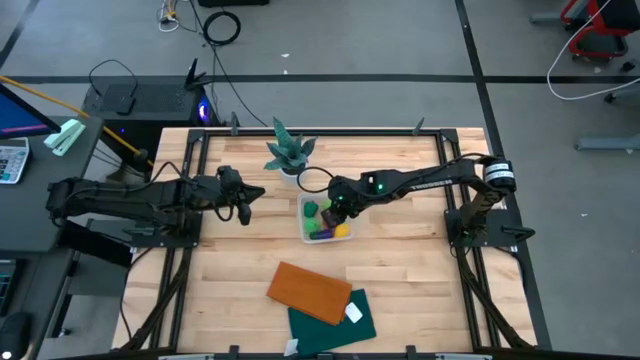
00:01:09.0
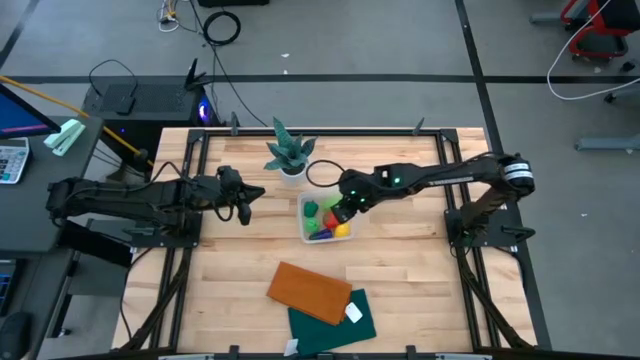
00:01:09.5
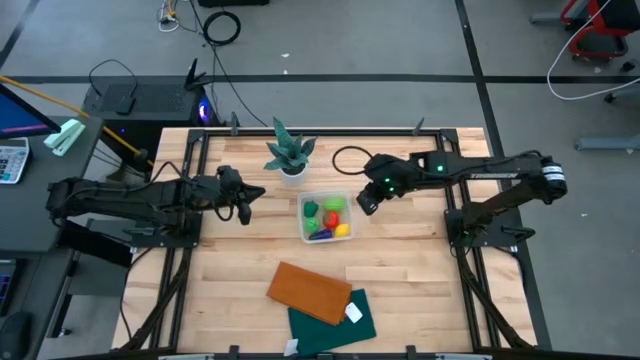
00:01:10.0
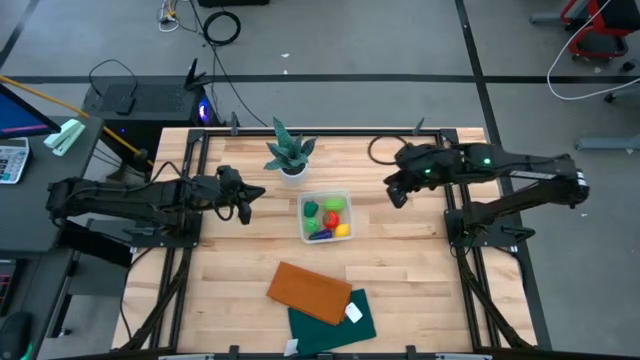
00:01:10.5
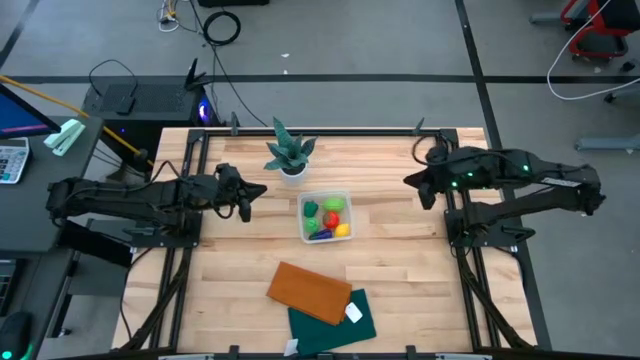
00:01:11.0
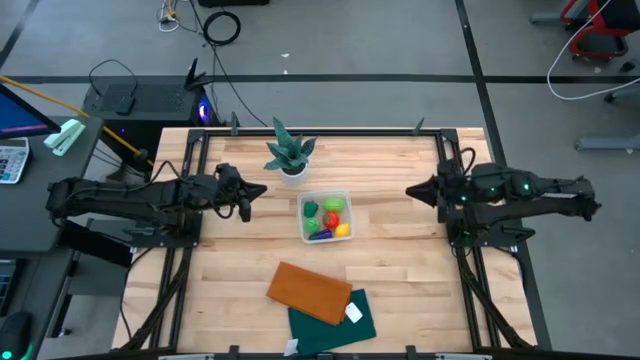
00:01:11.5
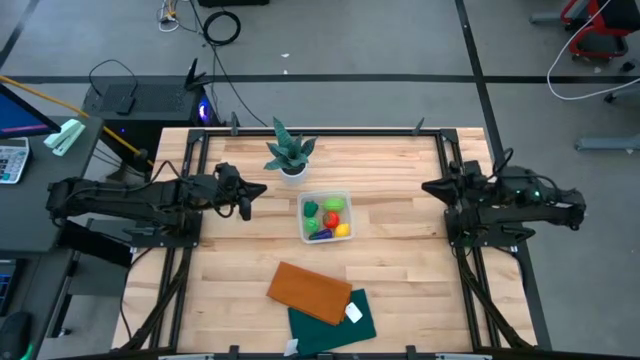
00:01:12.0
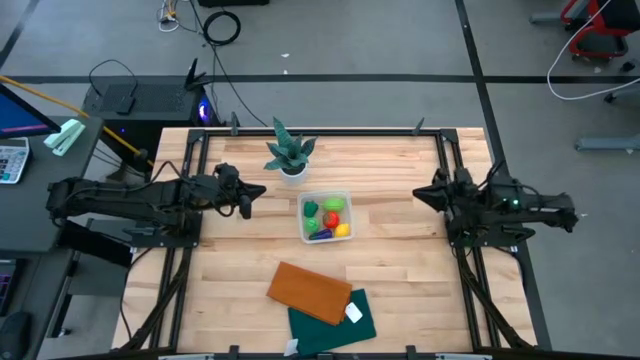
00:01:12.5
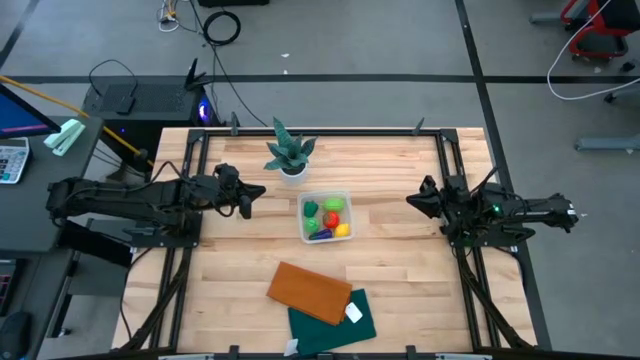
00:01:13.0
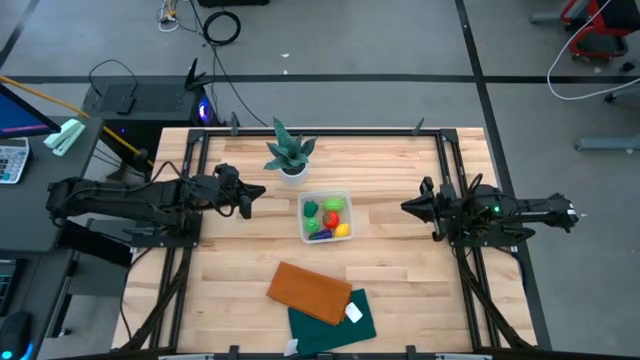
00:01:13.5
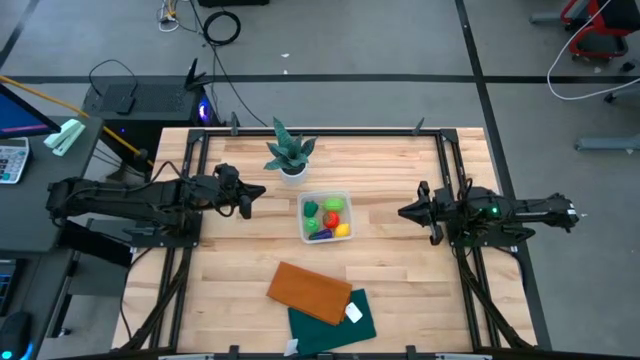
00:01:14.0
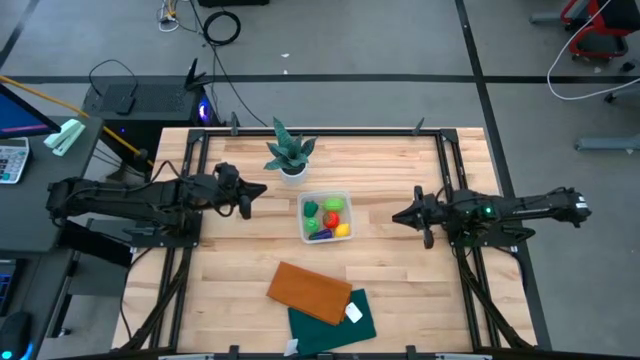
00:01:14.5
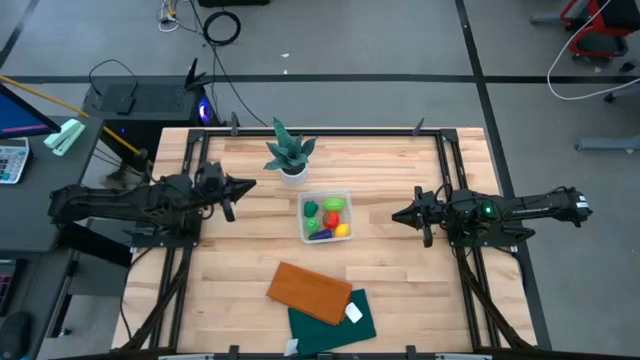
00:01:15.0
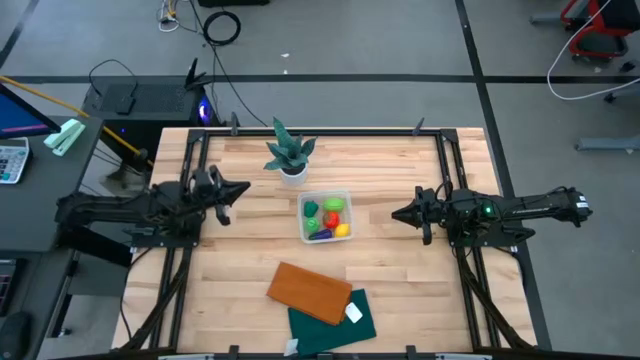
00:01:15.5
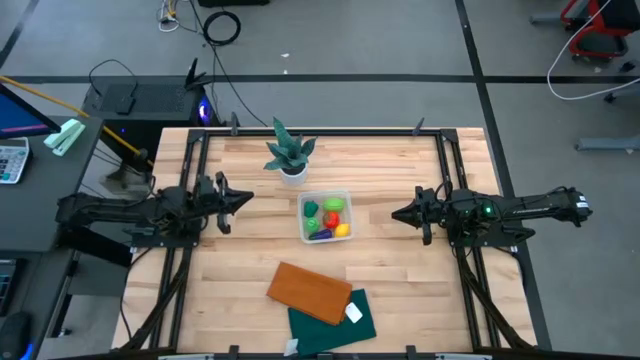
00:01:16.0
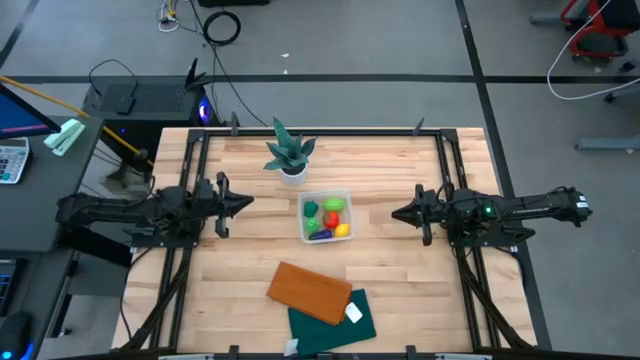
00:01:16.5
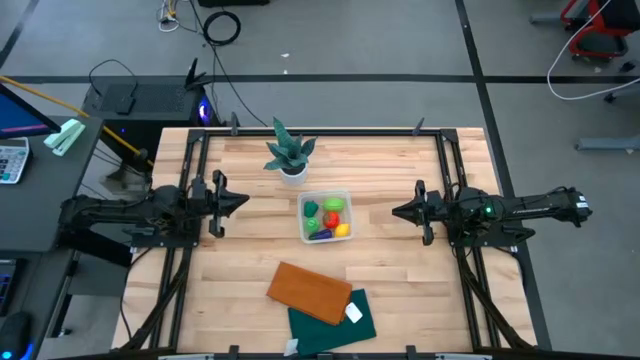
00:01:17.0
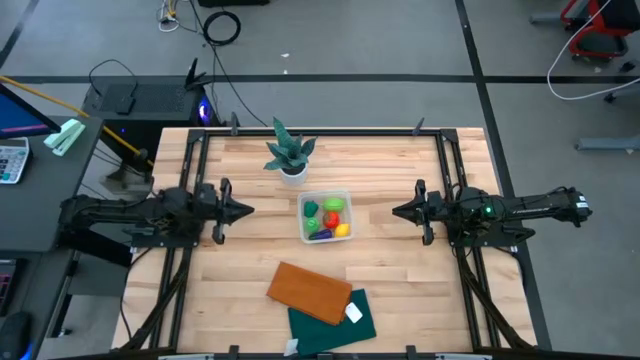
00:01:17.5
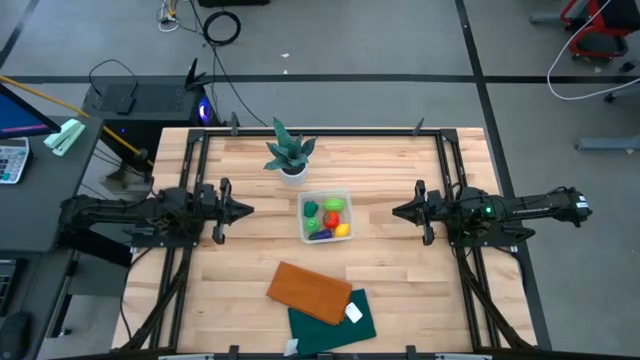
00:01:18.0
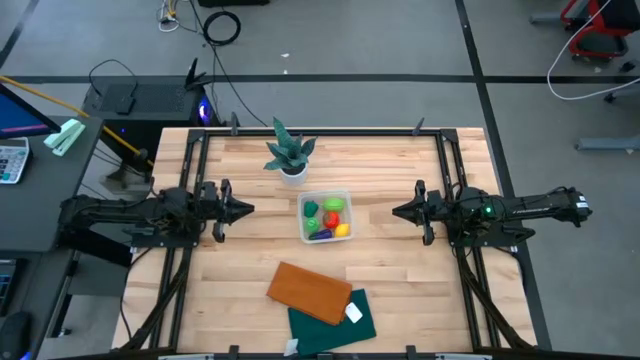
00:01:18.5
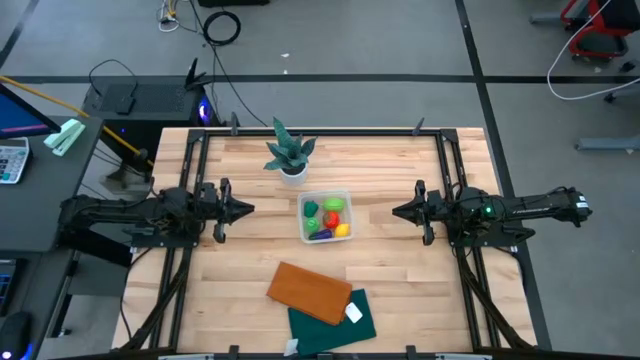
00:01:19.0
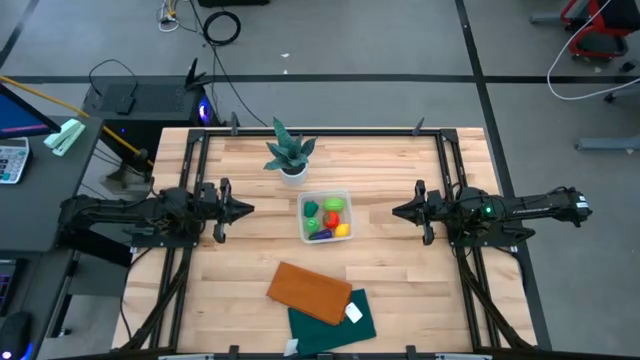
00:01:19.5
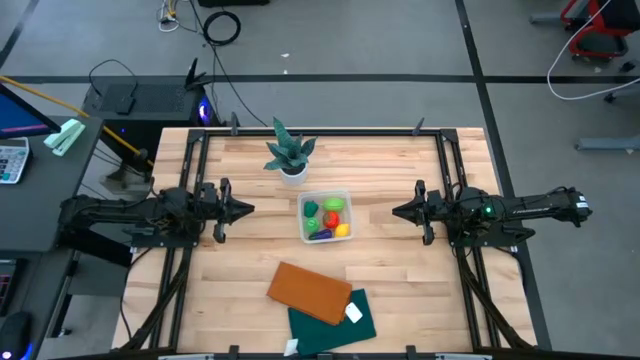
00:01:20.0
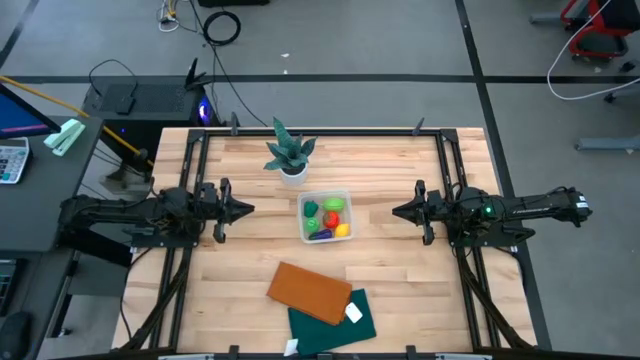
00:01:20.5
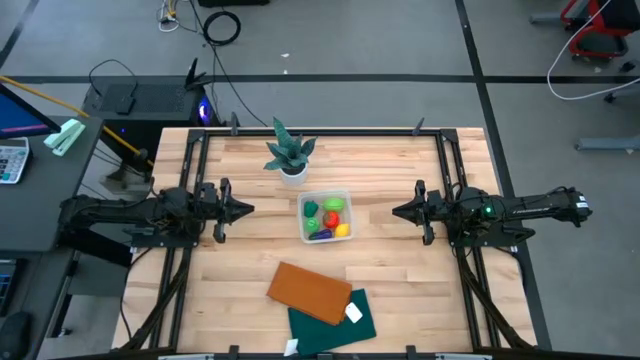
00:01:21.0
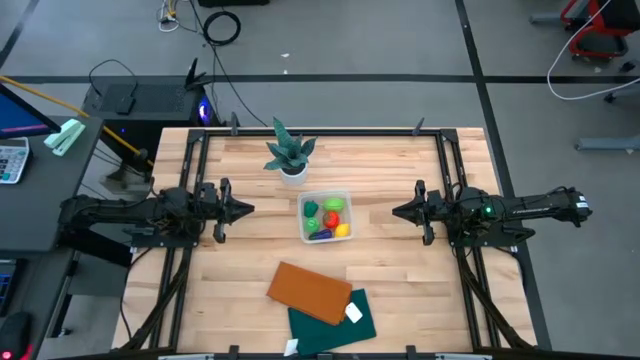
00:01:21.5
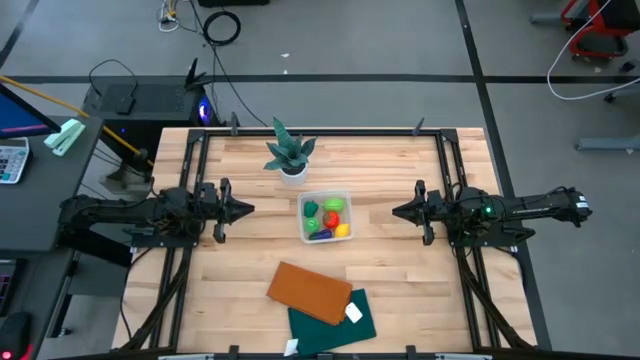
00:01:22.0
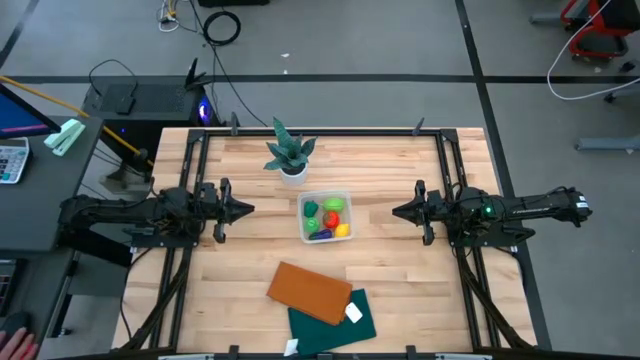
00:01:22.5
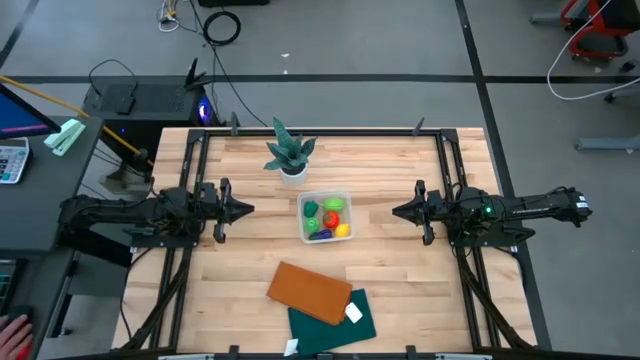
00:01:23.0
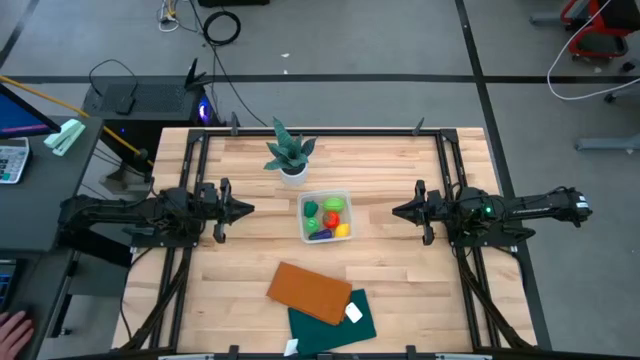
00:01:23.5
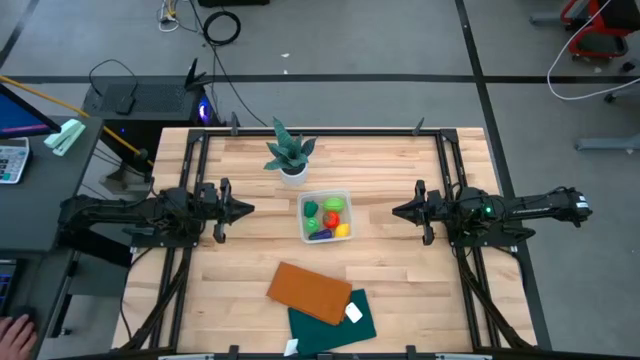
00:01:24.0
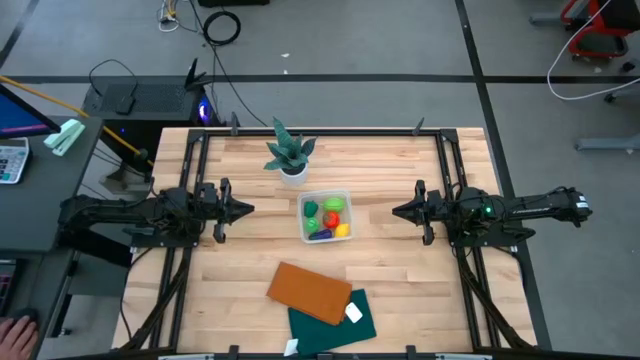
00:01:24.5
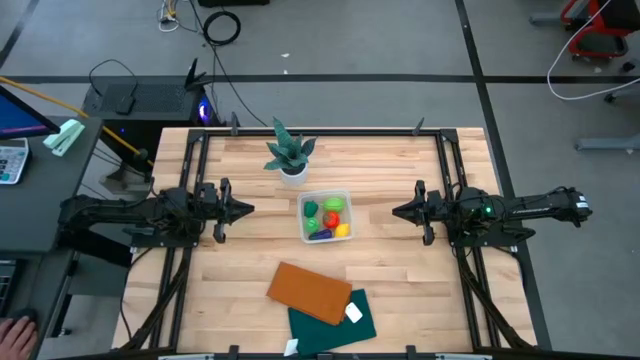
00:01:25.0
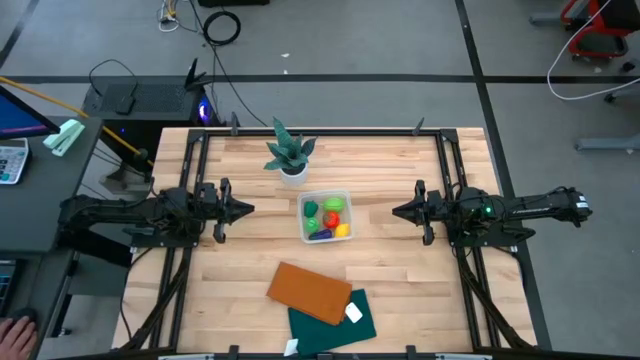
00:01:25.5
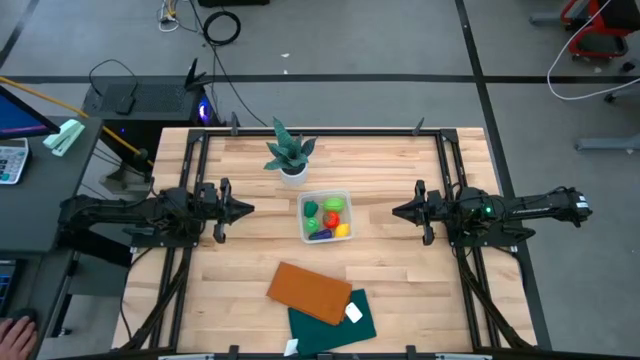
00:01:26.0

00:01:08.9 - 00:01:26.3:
Task: Pick and placing Produce into tupperware
Return to Home Position
